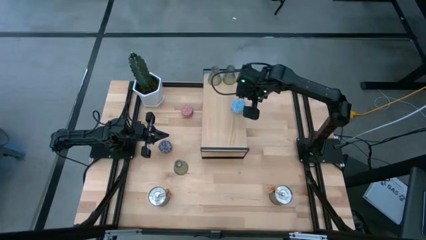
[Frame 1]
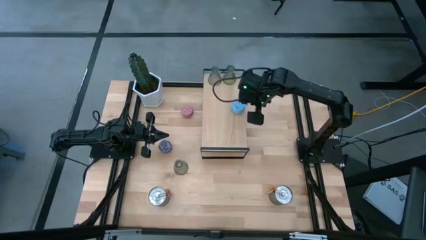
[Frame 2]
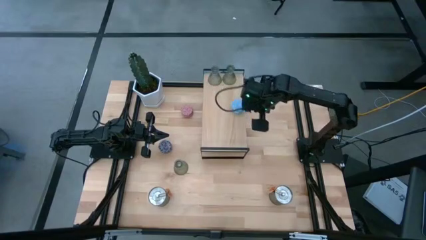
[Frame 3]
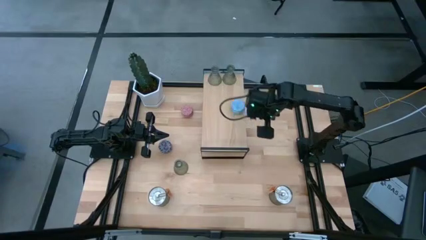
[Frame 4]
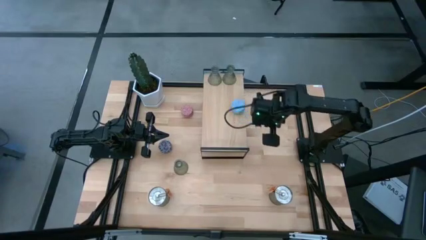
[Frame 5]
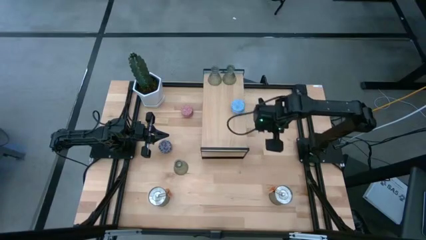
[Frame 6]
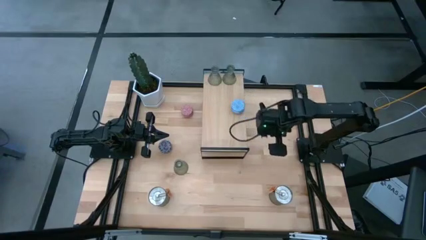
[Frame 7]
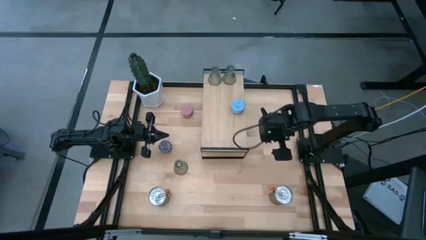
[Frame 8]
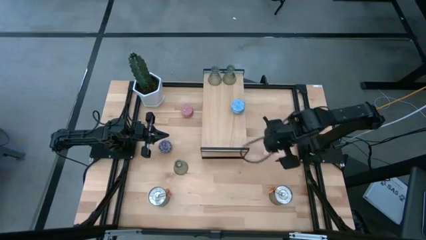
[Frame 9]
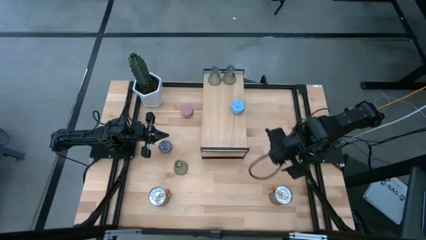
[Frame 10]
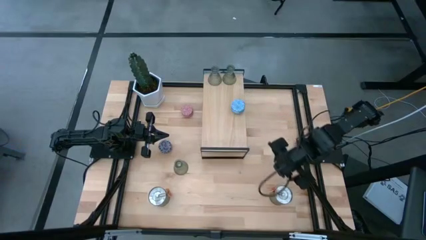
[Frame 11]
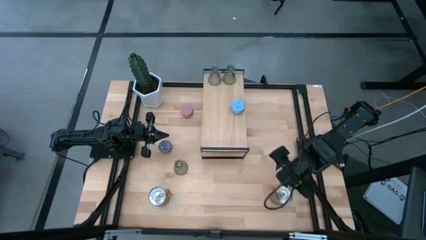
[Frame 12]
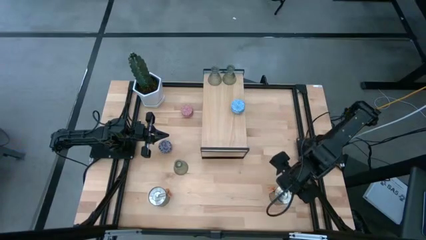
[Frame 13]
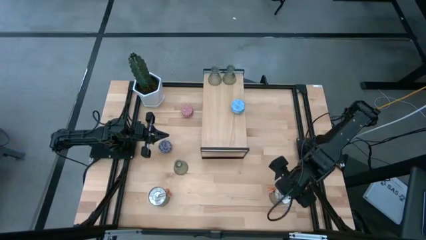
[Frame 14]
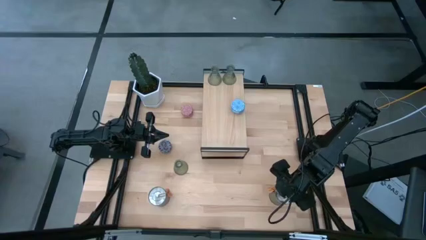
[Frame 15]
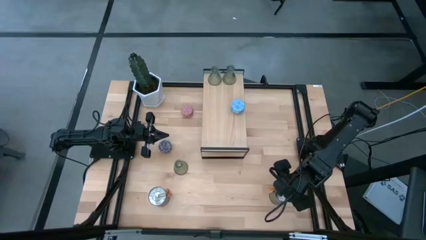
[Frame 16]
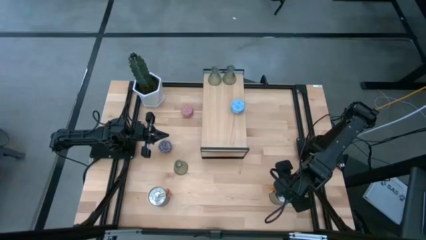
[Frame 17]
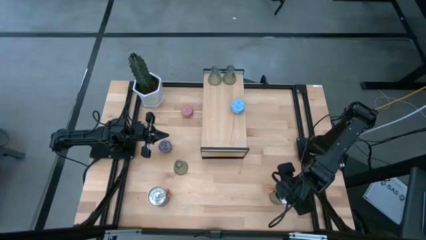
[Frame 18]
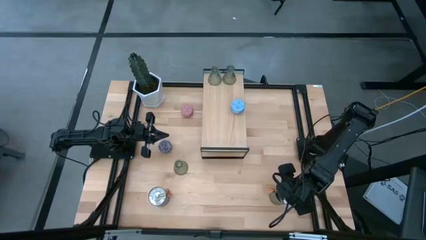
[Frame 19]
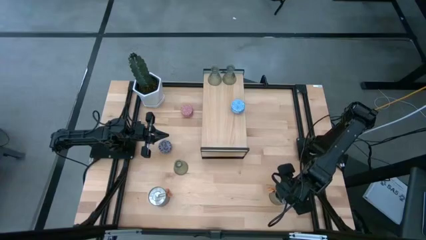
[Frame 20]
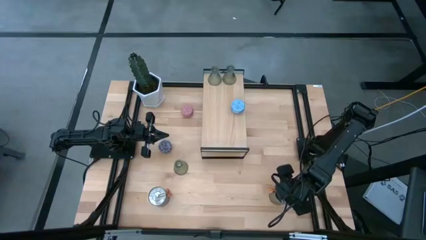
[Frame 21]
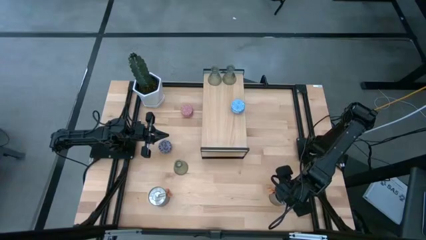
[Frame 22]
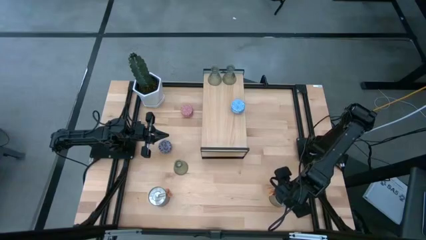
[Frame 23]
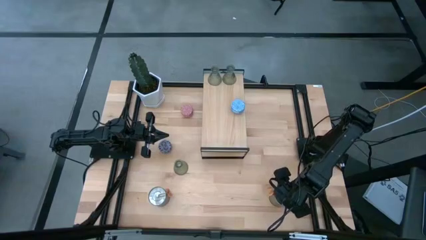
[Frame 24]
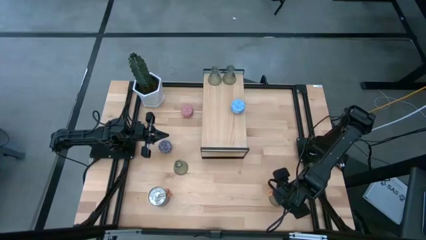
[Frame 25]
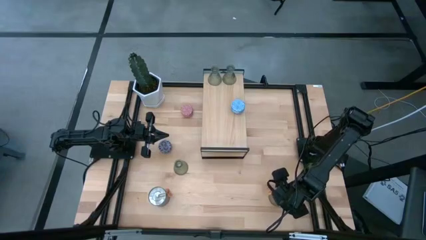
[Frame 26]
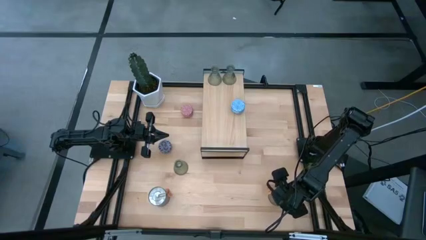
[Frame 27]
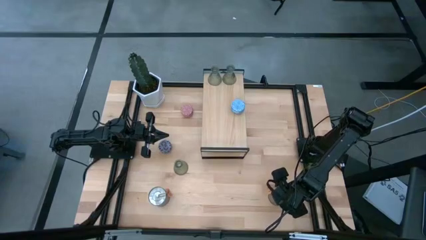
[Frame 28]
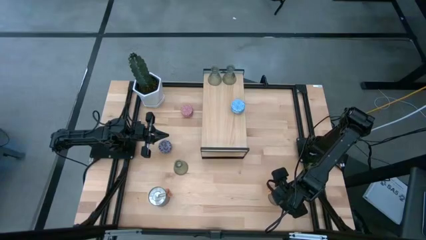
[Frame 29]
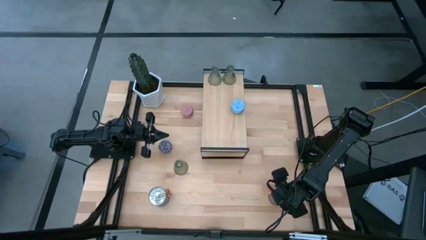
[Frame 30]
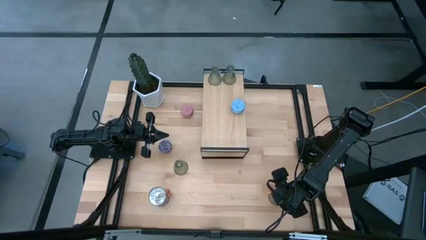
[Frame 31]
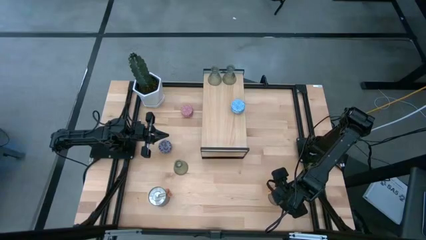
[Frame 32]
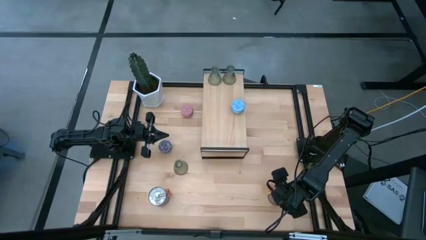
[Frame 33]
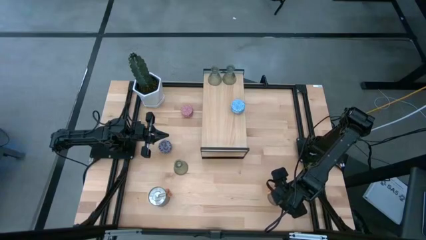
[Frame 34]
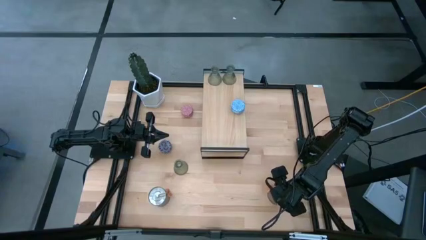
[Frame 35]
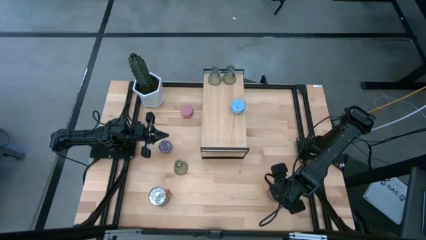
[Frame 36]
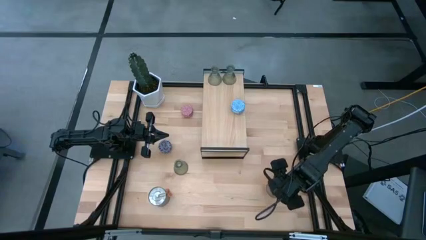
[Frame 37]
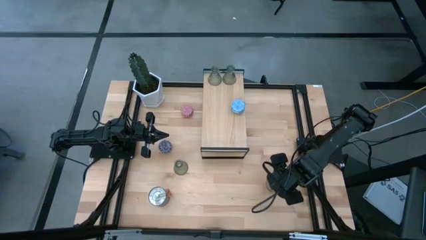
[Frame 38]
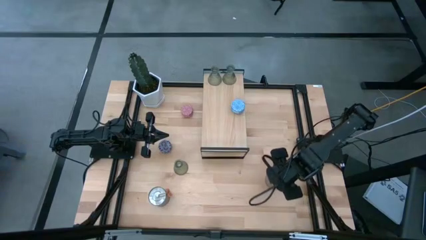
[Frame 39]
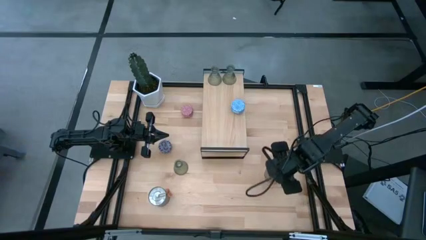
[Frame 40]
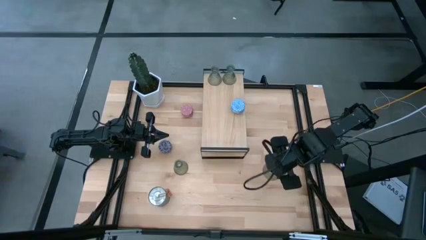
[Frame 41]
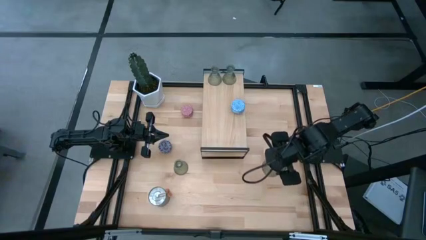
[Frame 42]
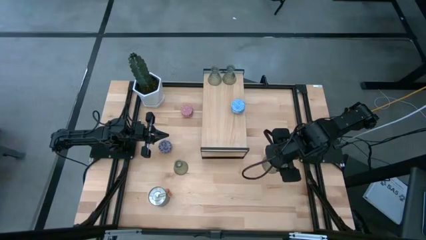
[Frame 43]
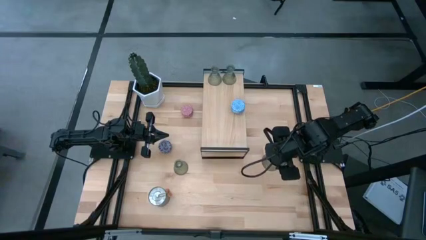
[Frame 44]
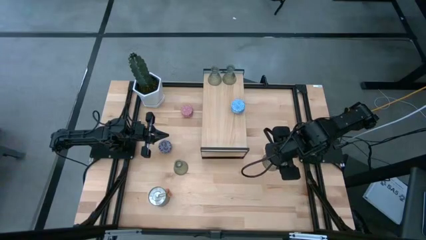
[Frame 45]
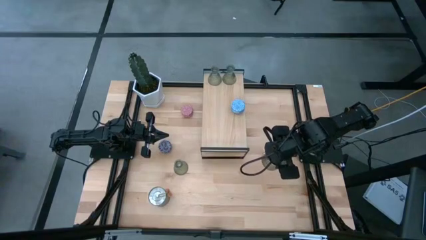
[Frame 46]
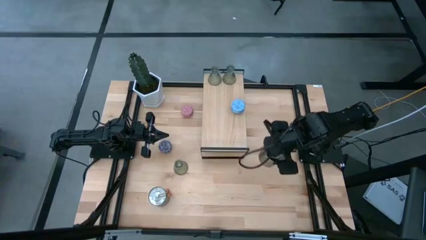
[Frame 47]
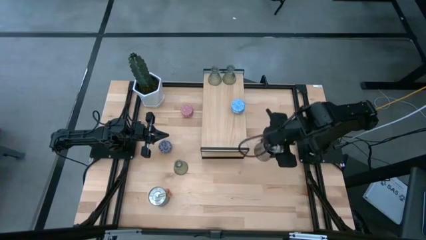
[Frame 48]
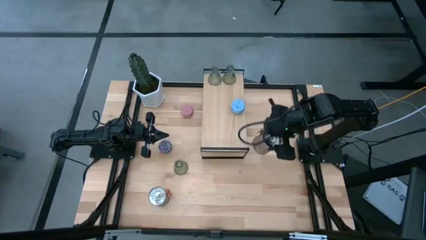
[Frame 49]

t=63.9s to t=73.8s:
Task: Pick & Place candle stick holders
Put the right silver scented candle can on the shelf

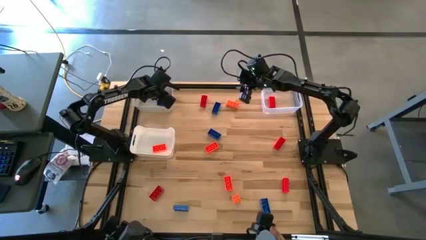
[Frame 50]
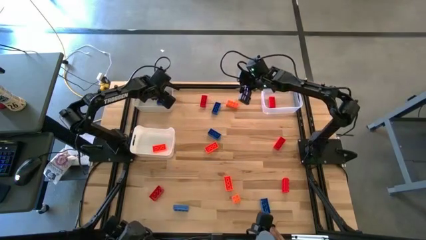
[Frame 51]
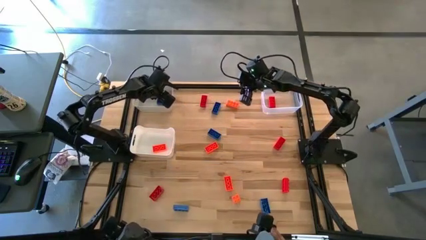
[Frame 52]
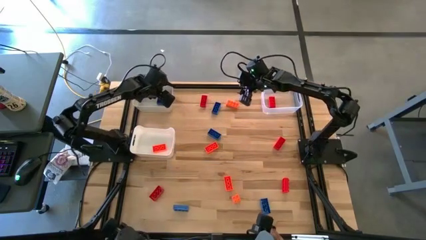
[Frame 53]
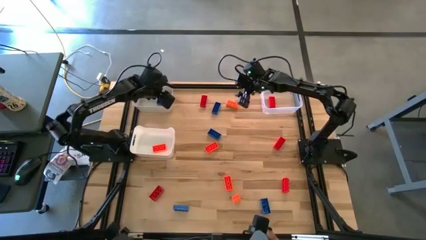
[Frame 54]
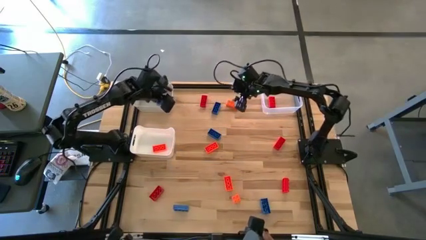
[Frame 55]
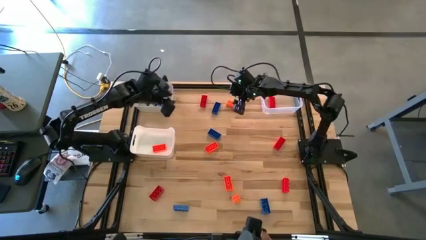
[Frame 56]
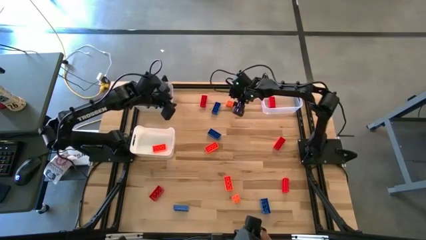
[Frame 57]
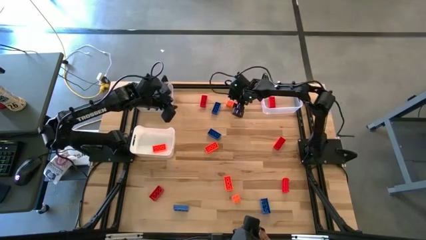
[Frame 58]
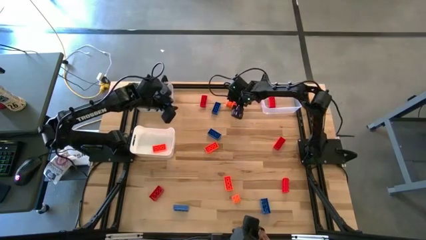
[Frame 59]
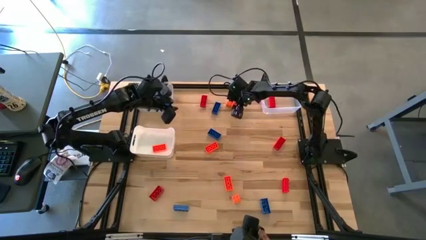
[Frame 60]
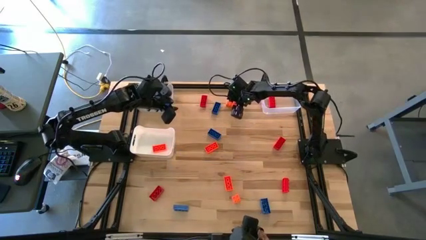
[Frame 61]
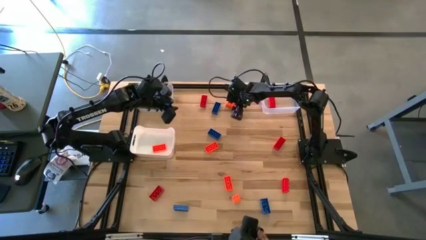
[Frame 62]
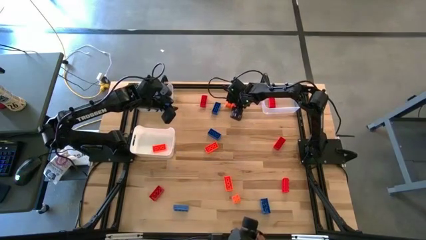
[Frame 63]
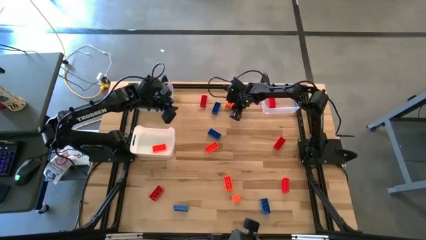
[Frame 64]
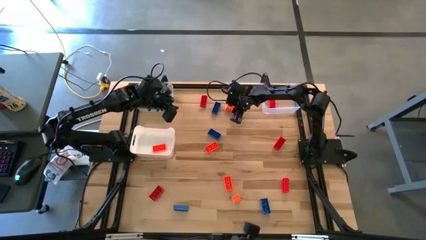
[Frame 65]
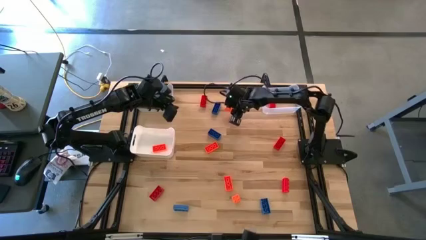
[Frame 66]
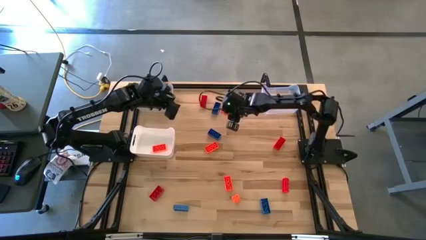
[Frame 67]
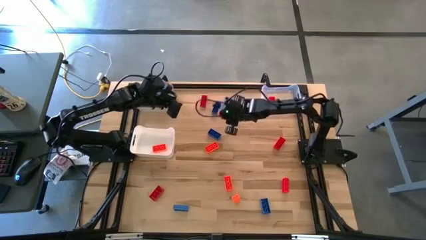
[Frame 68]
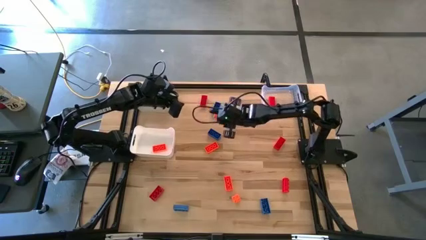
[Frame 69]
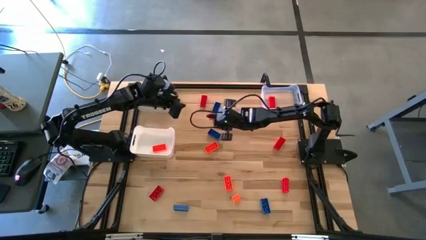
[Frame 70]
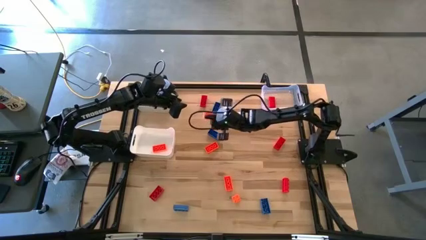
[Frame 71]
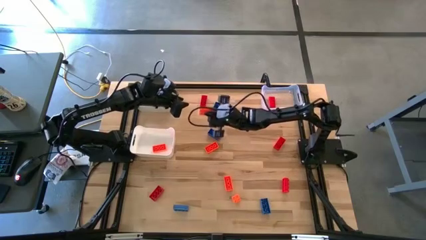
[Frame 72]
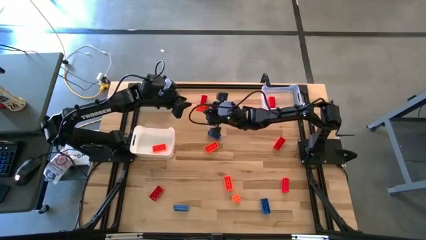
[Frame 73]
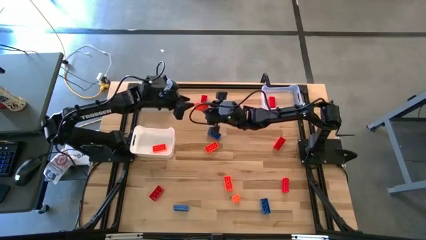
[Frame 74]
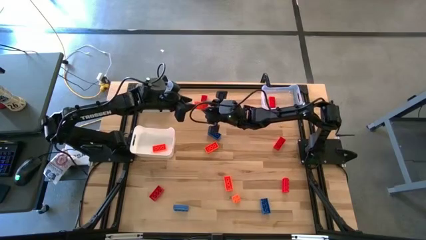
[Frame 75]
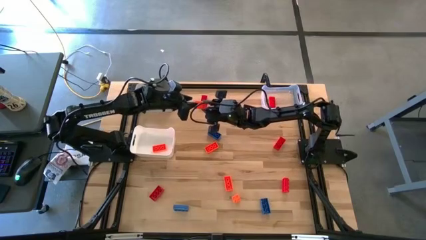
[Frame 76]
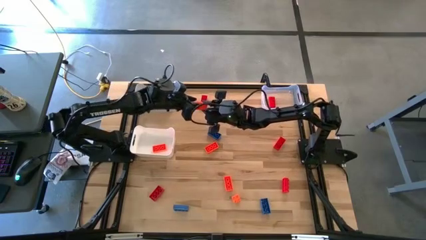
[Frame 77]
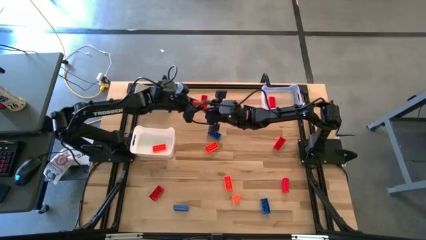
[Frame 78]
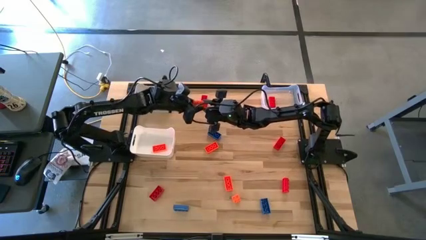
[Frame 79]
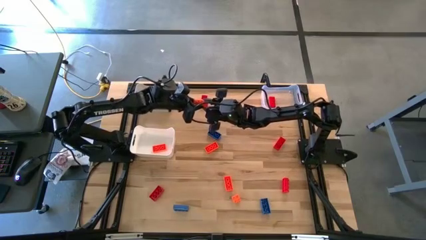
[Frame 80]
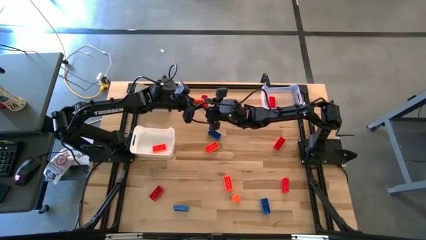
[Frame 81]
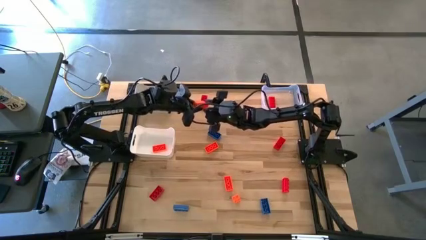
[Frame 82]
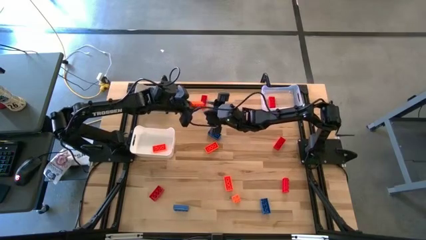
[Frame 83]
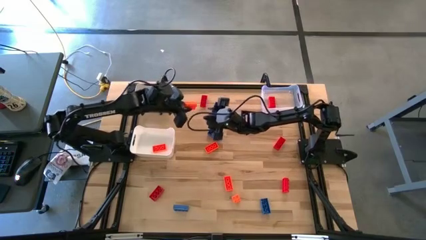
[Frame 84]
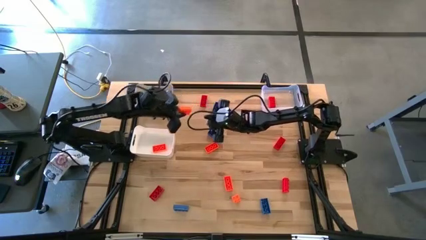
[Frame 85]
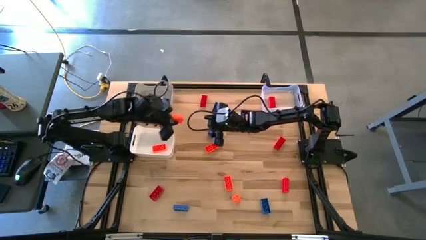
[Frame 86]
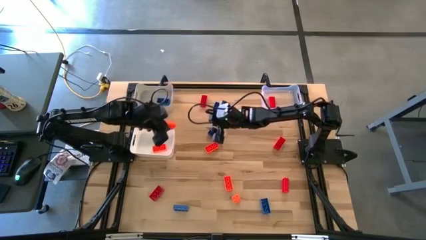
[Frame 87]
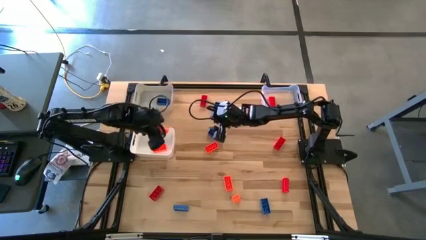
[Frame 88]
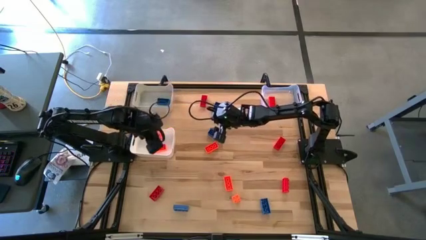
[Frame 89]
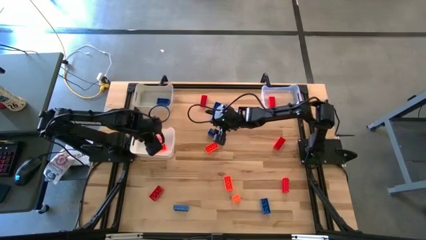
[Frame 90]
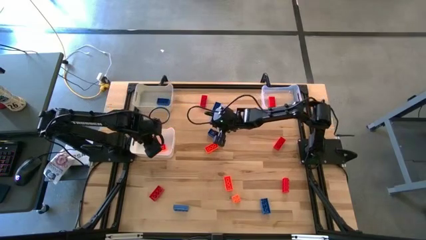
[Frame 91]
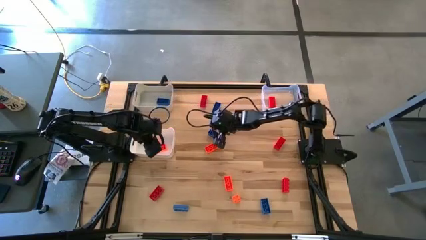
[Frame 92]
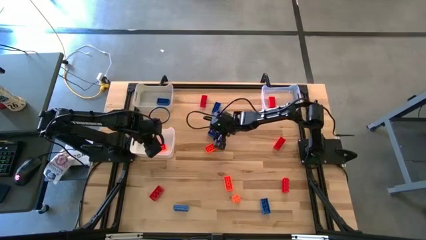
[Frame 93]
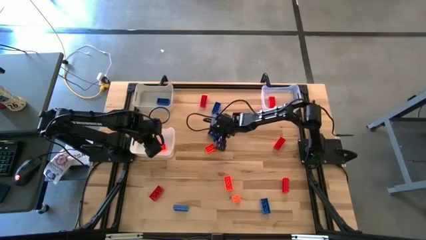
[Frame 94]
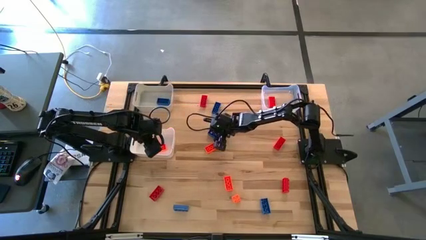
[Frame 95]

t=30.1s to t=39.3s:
Task: Sort & place blocks by color
Put the orange game piece into the white bin
